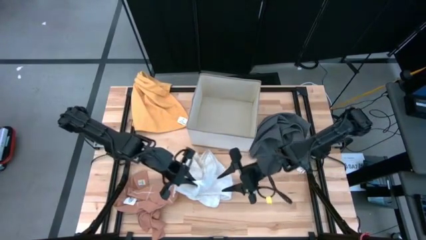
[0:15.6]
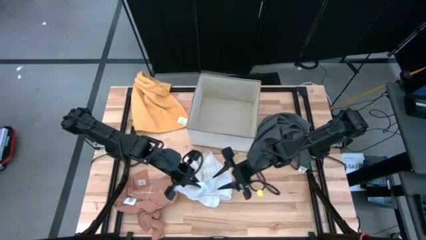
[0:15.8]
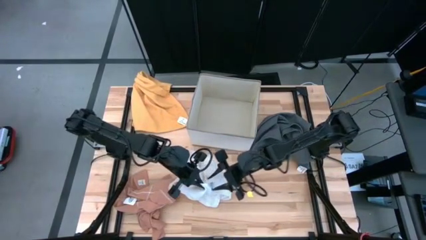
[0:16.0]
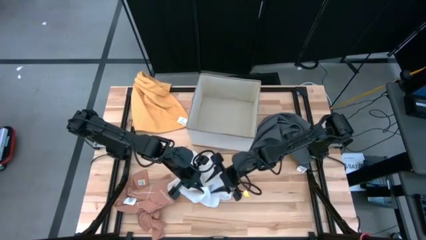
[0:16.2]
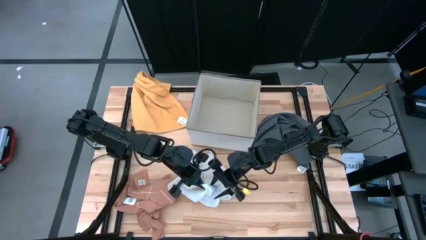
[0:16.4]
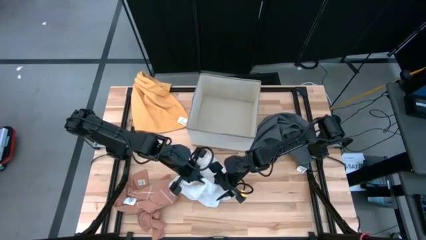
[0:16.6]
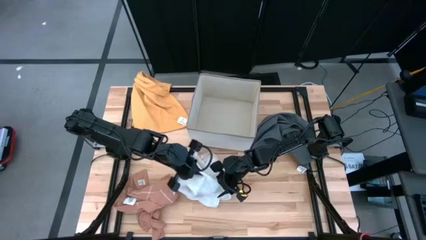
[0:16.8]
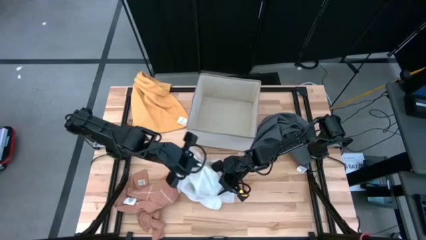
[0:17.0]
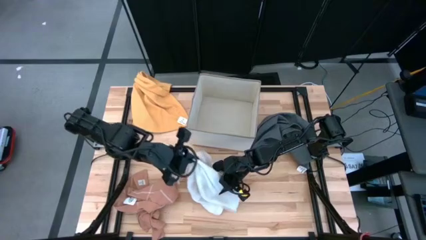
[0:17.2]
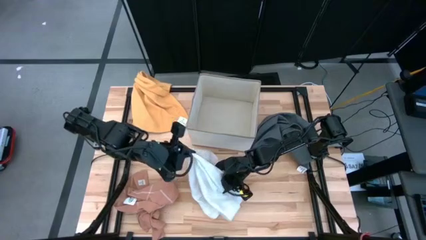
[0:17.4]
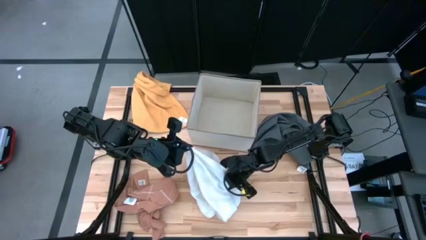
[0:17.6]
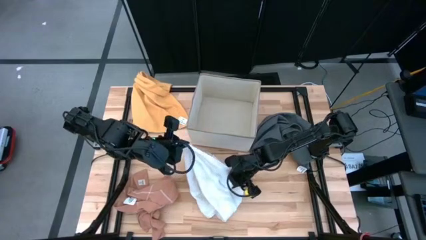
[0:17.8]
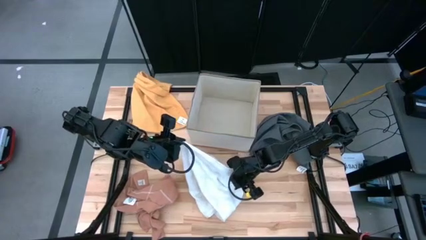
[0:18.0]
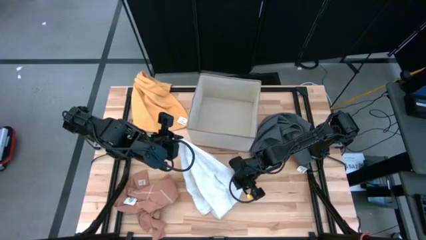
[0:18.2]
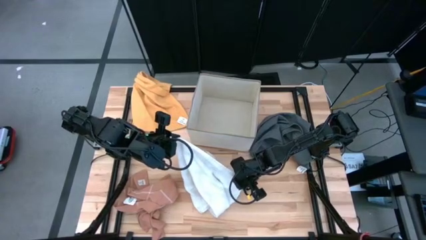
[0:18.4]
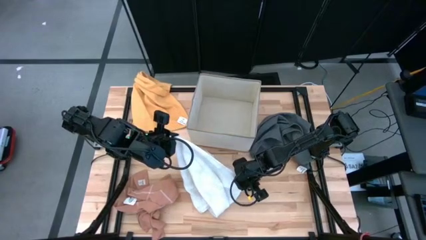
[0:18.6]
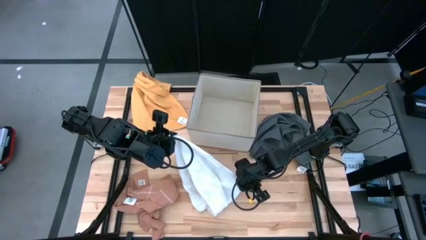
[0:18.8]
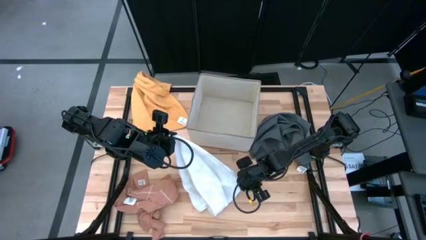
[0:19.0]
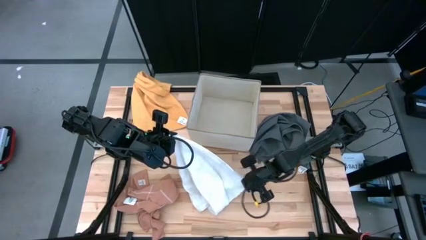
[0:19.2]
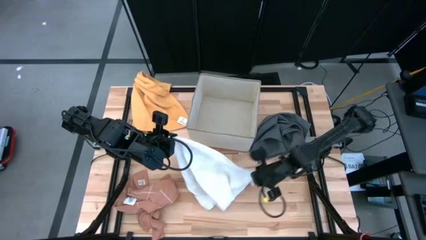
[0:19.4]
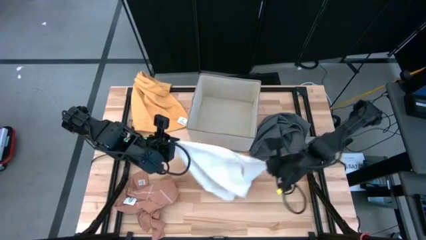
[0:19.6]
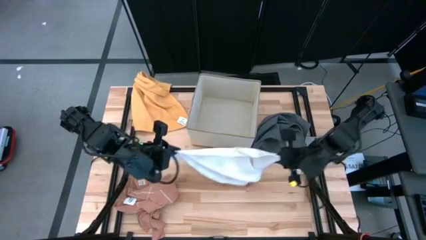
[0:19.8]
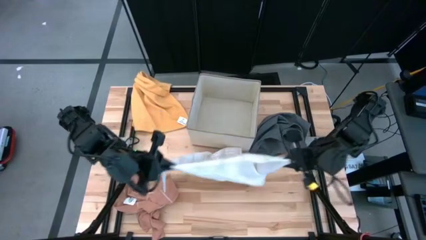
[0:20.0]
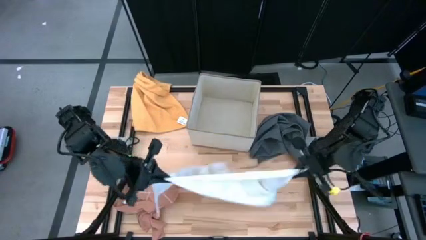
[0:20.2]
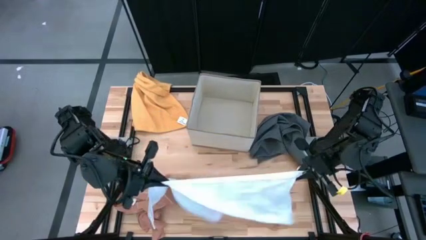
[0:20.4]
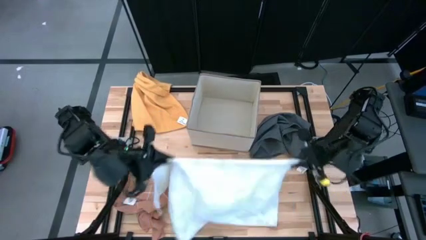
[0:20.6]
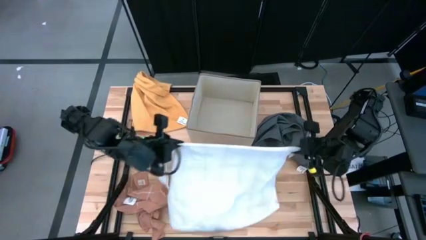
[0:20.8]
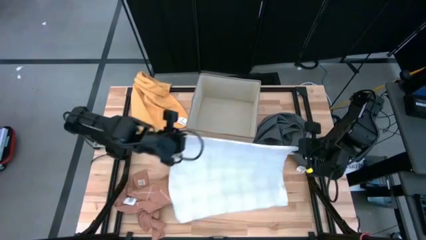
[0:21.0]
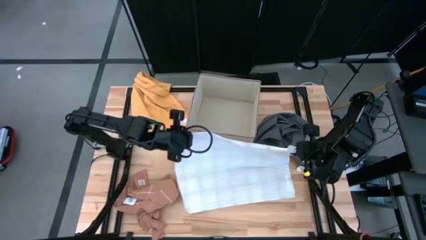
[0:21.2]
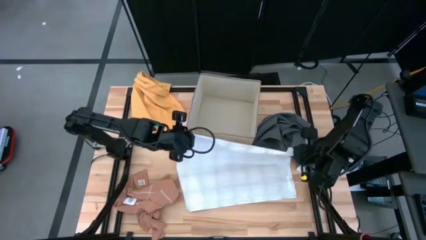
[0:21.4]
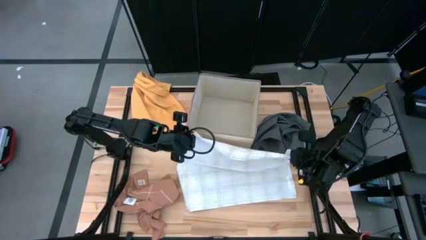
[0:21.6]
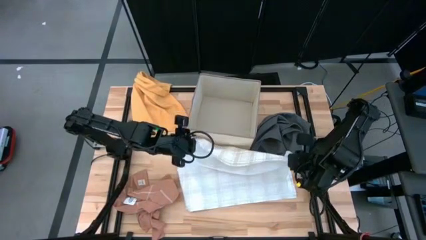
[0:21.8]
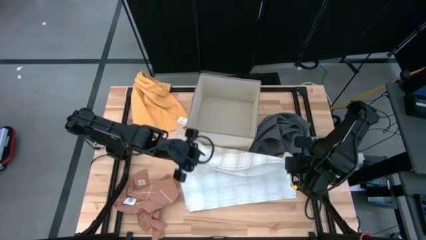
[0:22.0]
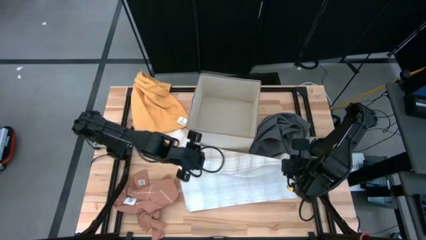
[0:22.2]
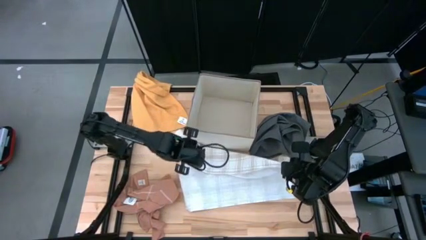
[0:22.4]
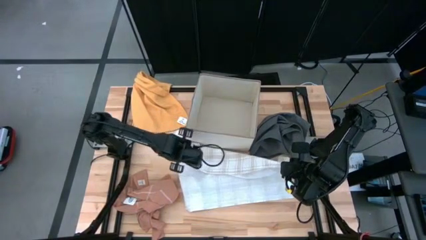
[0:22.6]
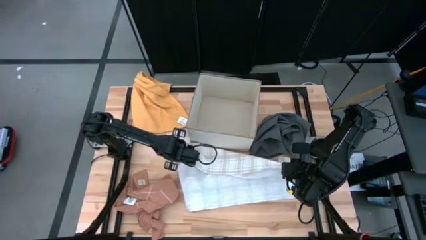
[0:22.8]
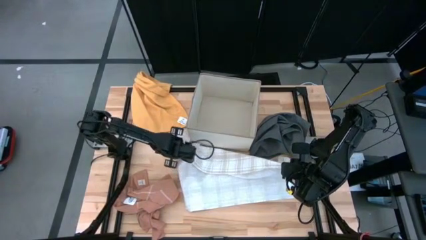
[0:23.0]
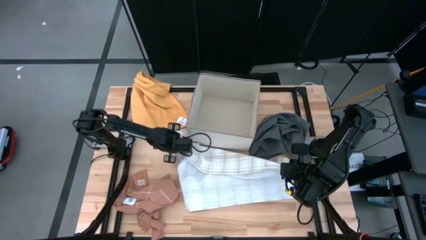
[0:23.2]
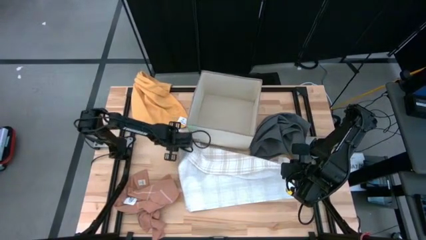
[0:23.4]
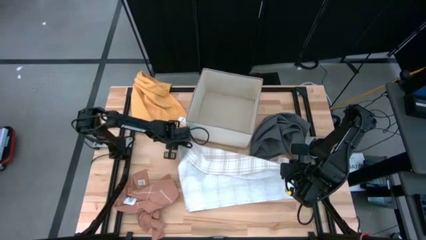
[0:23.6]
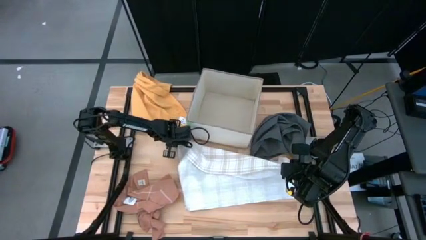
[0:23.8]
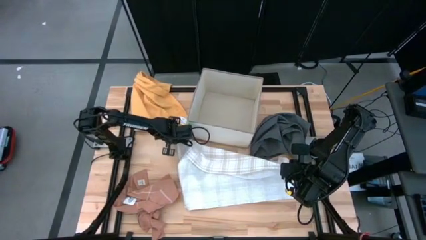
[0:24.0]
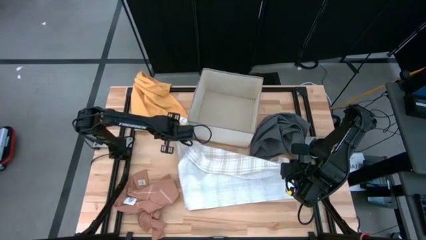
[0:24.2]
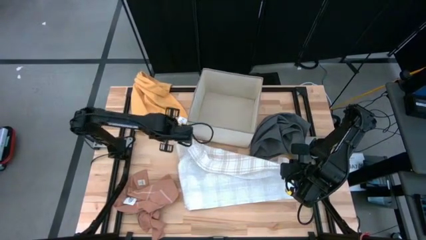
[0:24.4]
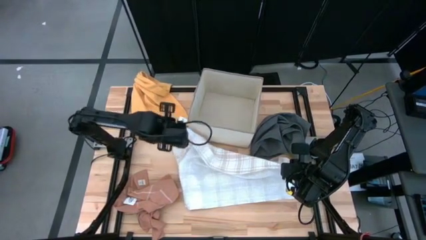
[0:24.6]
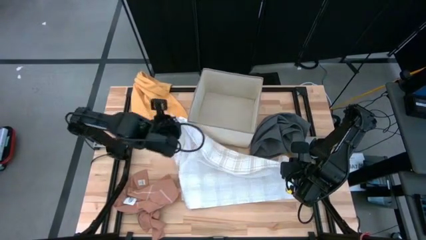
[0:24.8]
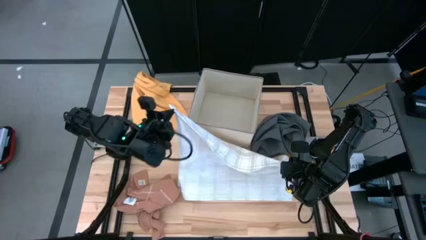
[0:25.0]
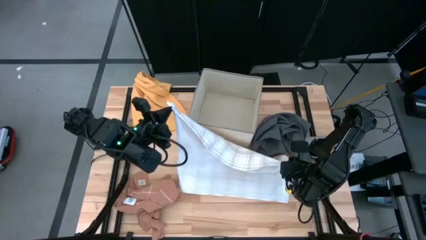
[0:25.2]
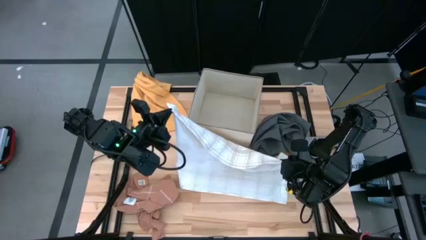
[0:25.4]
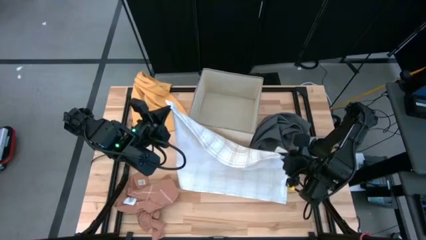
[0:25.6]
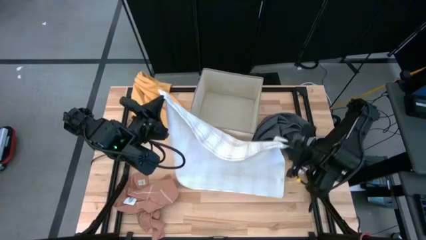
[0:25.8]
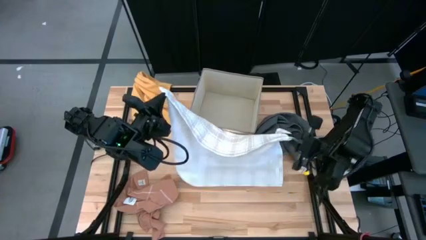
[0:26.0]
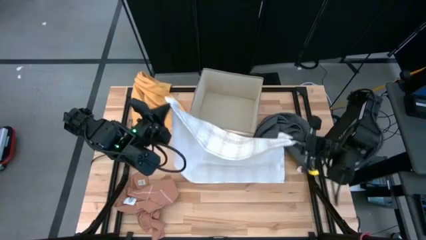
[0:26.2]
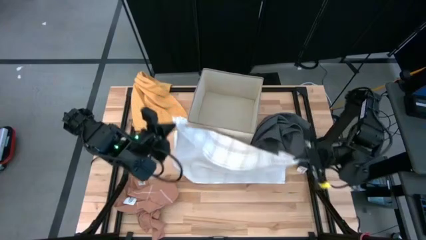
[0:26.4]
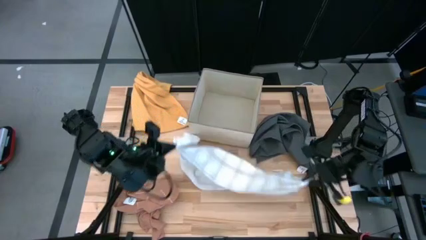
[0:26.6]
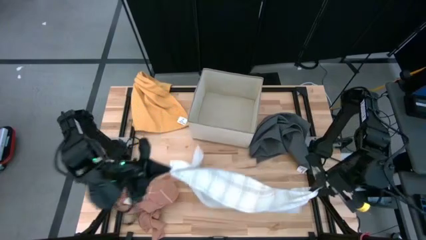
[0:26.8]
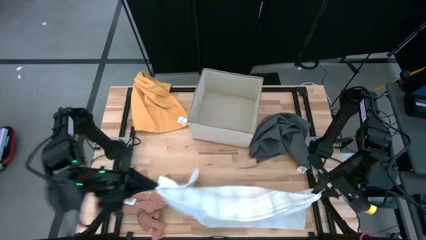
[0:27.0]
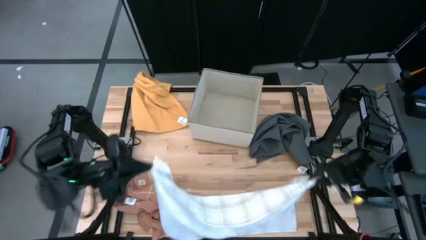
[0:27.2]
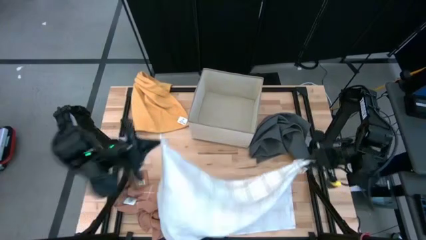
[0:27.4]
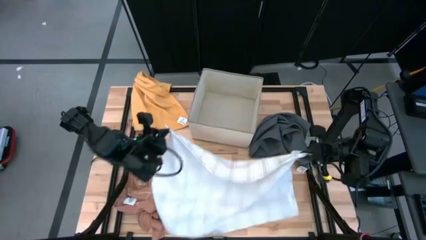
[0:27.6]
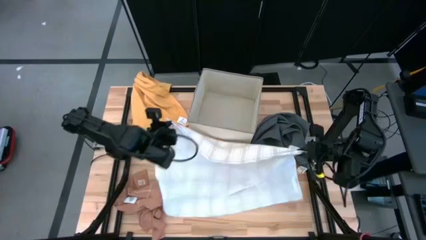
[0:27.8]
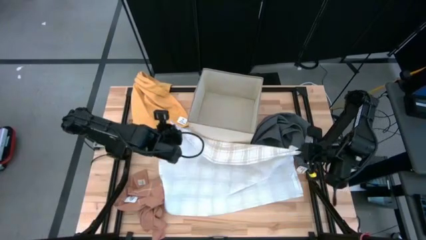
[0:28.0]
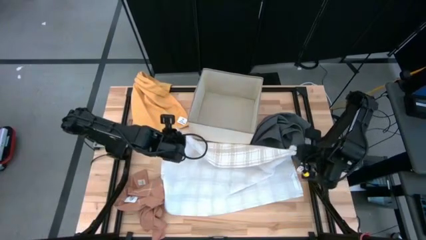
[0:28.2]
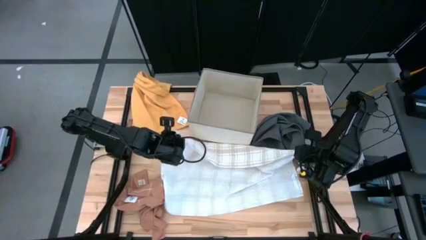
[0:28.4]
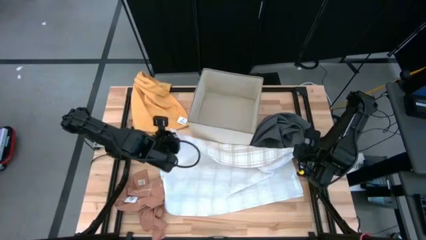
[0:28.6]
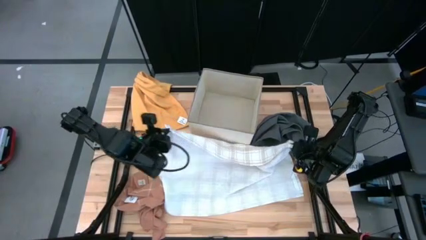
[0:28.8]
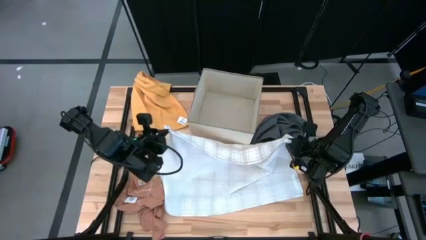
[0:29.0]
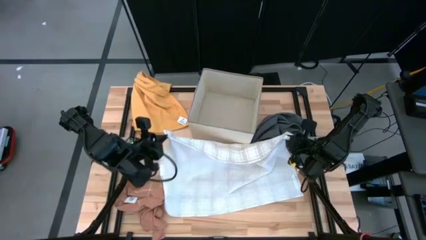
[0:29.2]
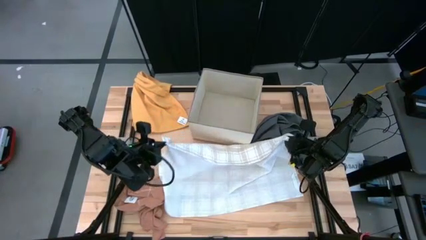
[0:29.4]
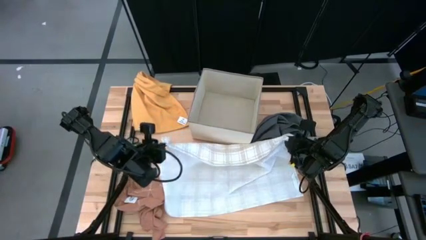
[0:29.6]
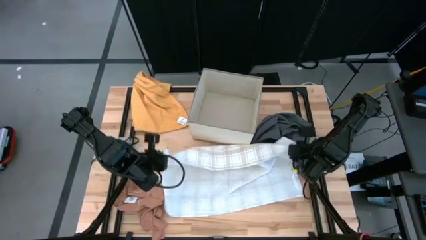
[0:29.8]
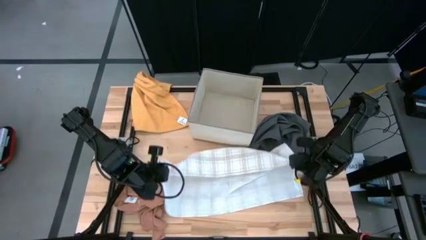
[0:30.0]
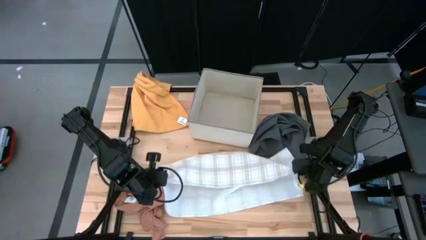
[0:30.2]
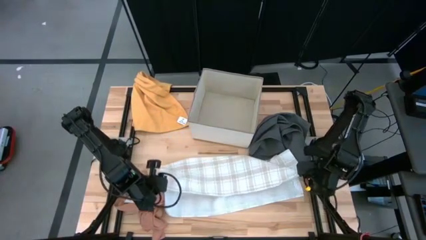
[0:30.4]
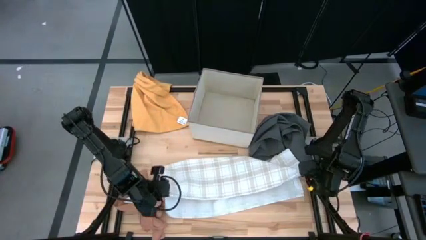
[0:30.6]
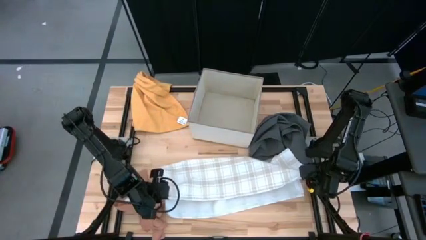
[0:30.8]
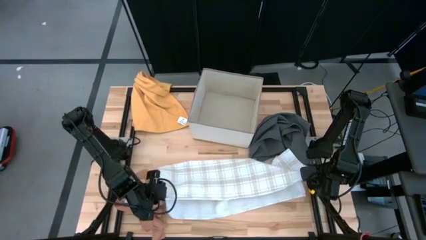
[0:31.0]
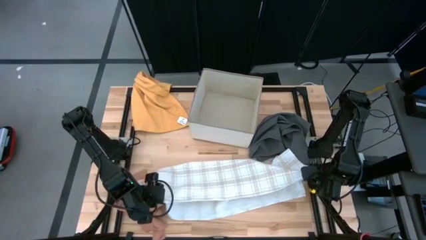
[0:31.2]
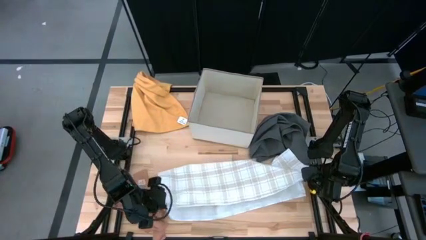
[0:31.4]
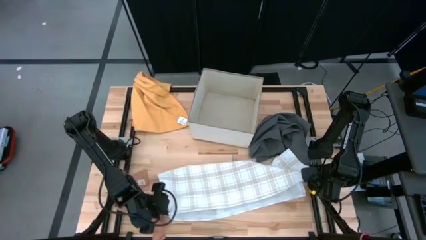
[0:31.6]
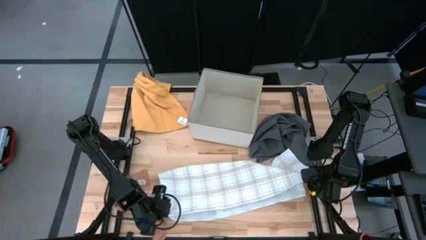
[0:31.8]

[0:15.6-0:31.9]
Task: Fold towel
Fold the white towel
